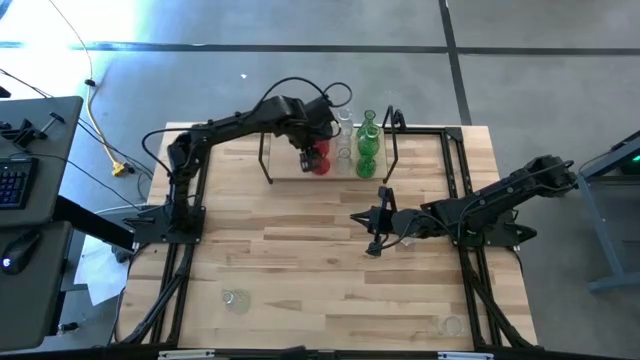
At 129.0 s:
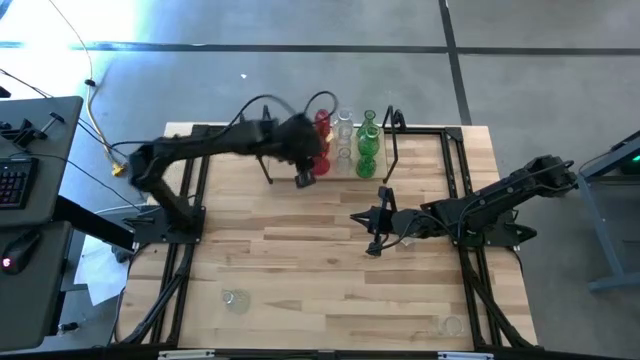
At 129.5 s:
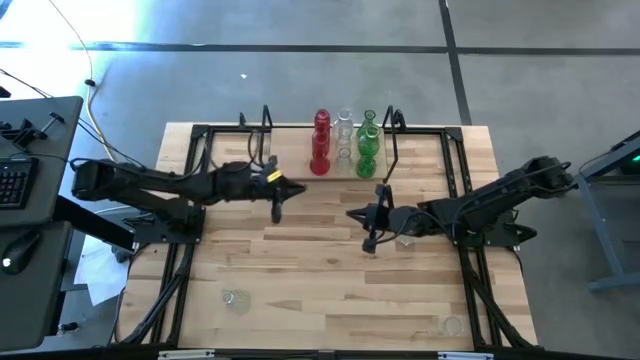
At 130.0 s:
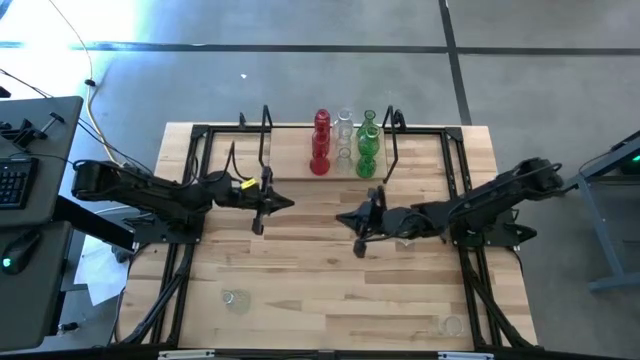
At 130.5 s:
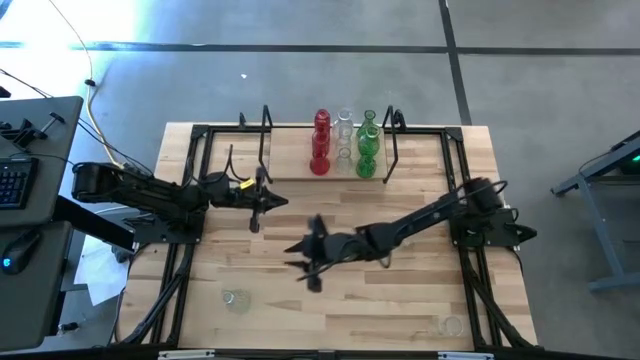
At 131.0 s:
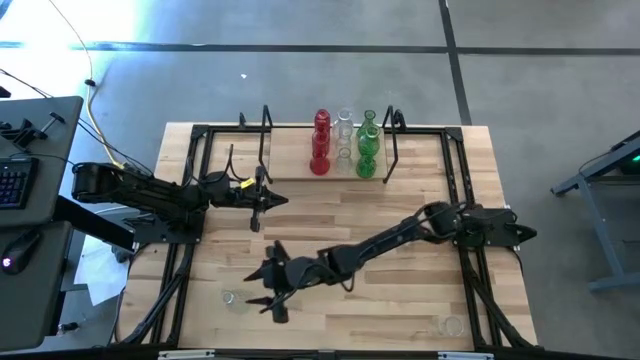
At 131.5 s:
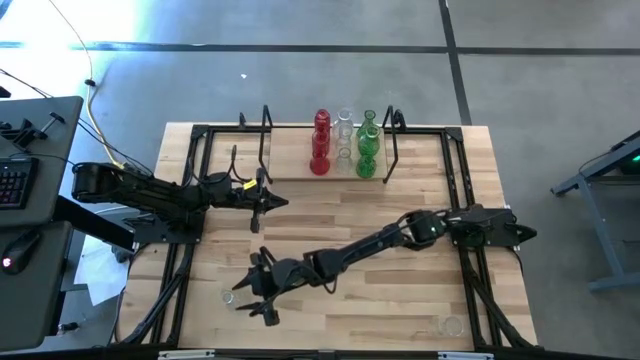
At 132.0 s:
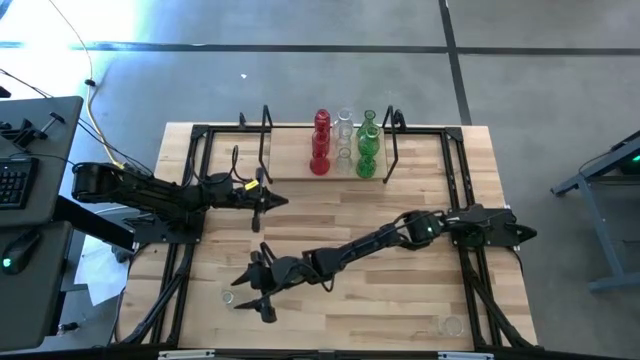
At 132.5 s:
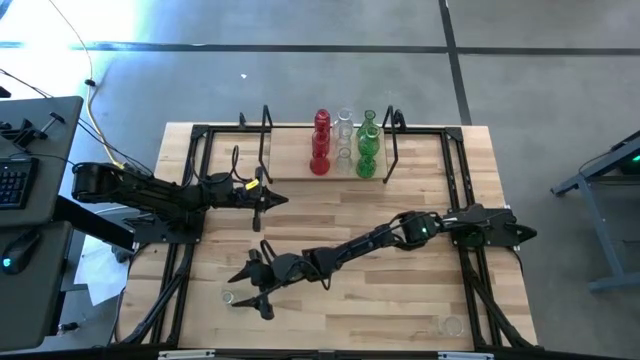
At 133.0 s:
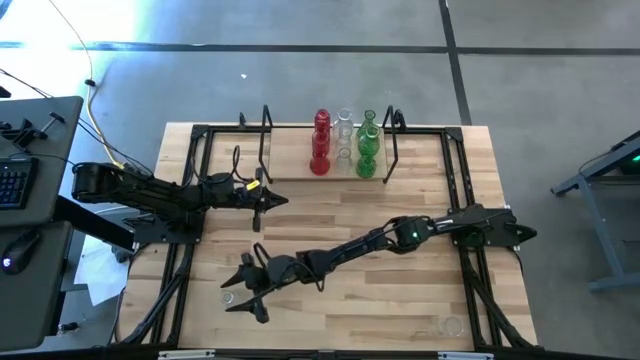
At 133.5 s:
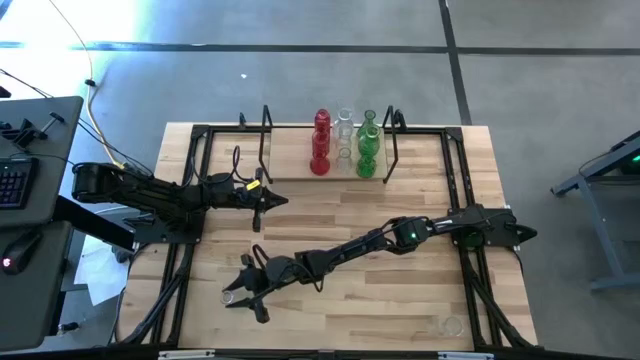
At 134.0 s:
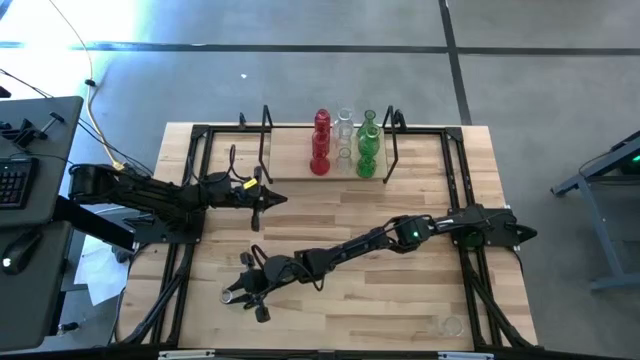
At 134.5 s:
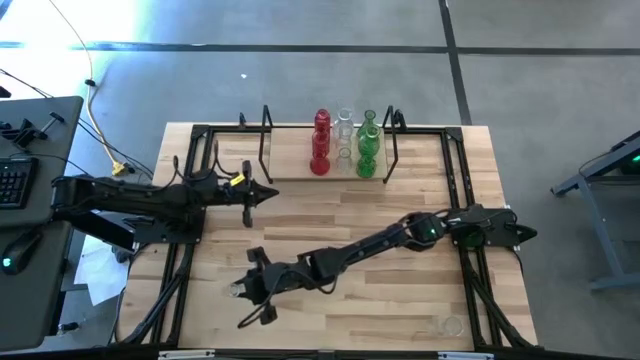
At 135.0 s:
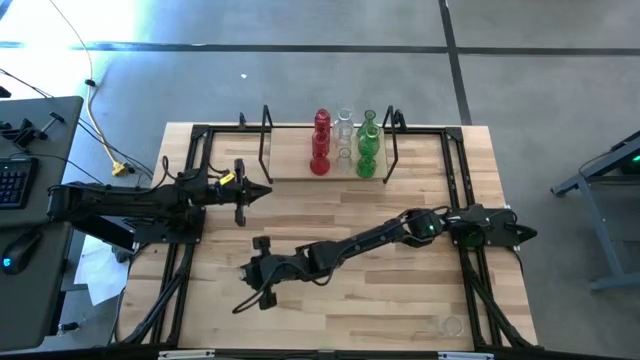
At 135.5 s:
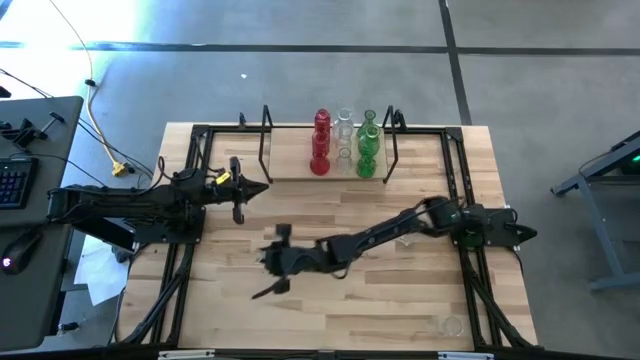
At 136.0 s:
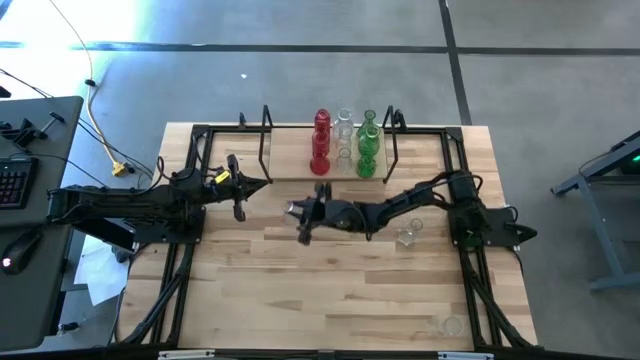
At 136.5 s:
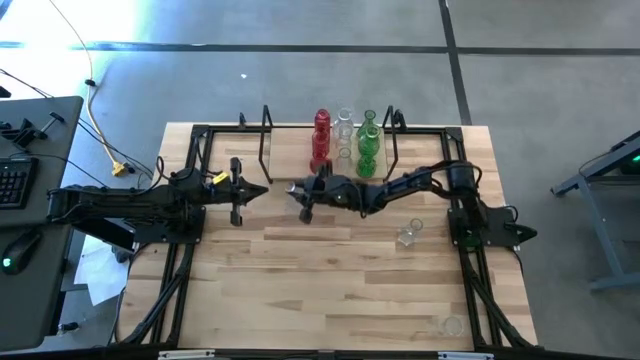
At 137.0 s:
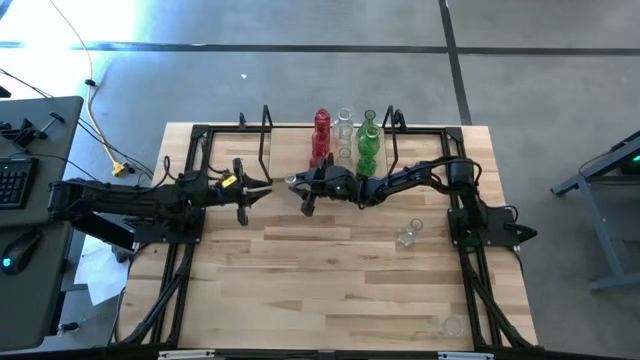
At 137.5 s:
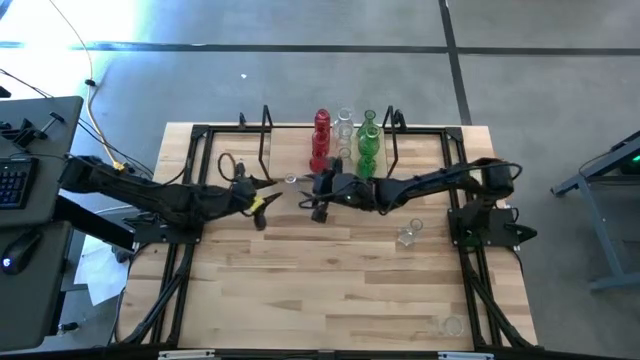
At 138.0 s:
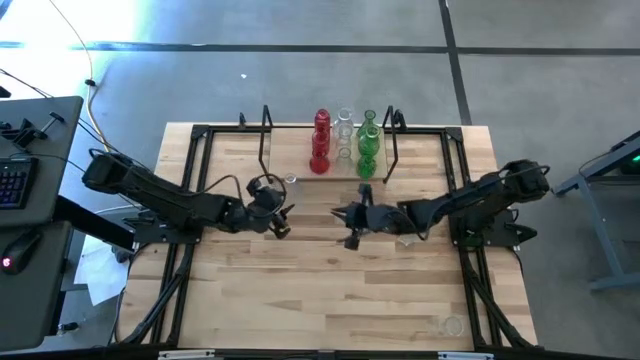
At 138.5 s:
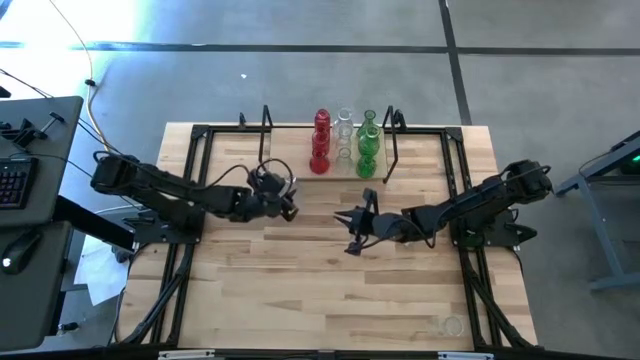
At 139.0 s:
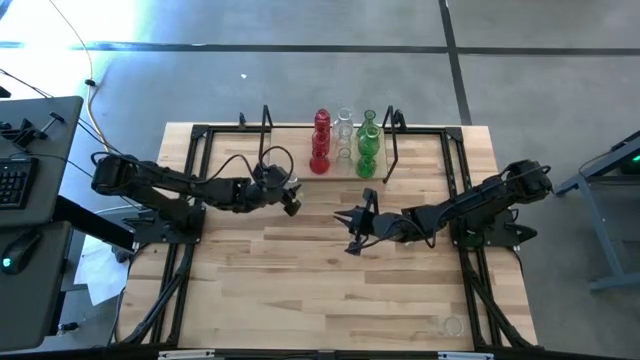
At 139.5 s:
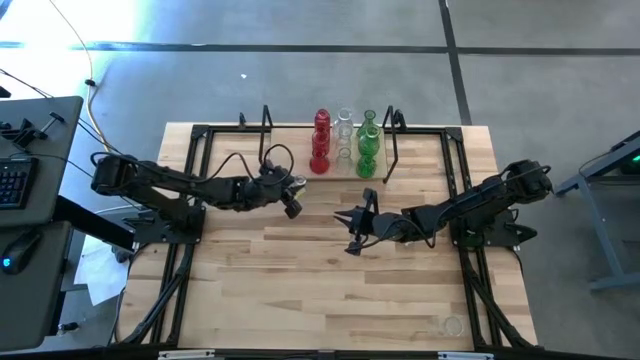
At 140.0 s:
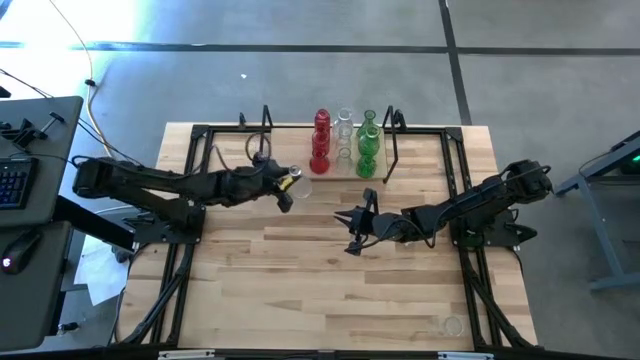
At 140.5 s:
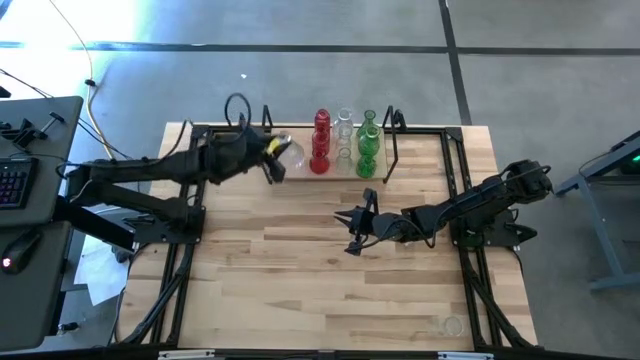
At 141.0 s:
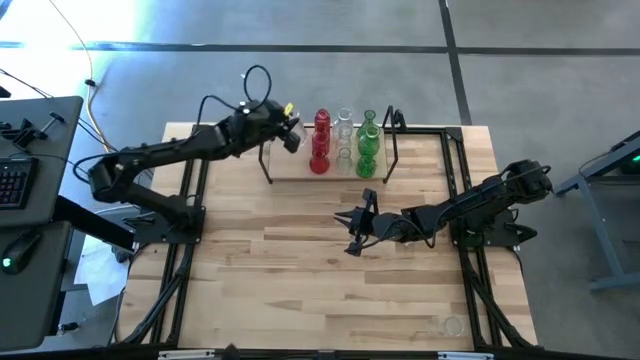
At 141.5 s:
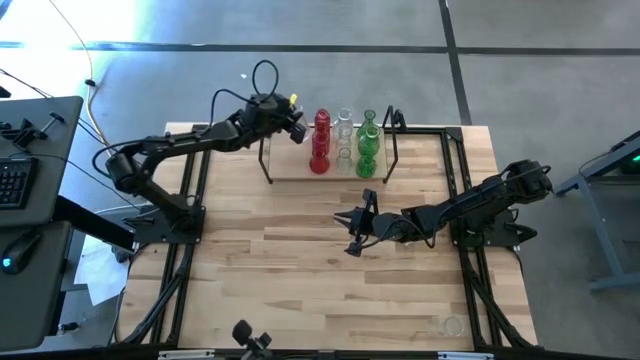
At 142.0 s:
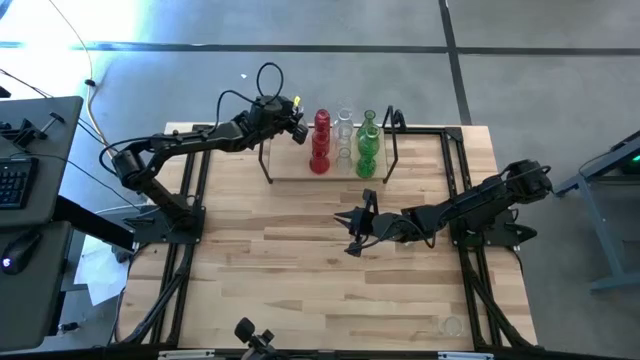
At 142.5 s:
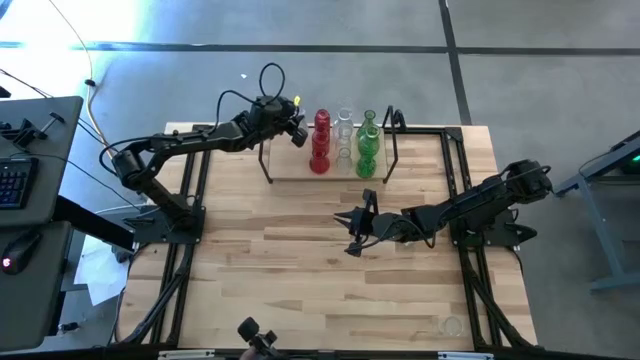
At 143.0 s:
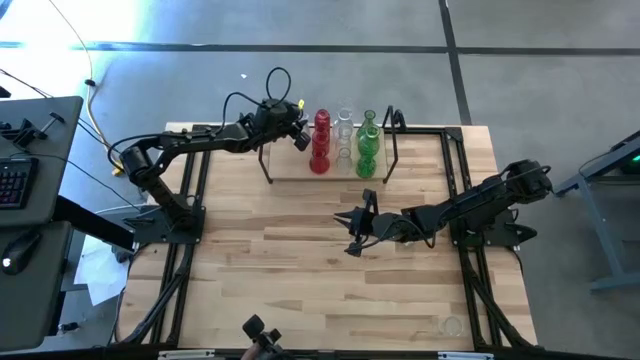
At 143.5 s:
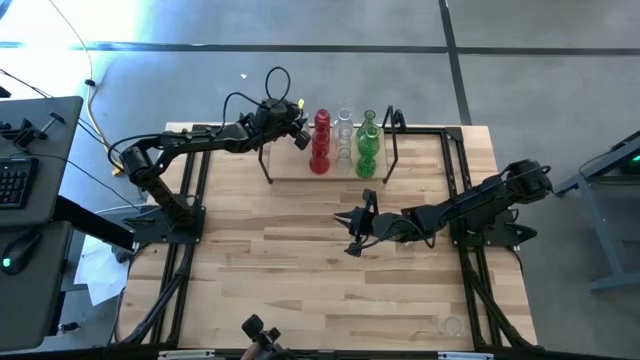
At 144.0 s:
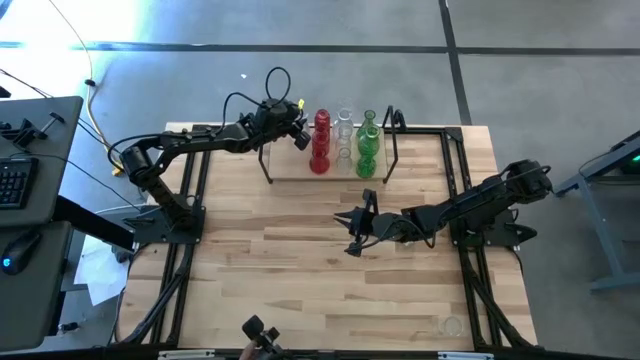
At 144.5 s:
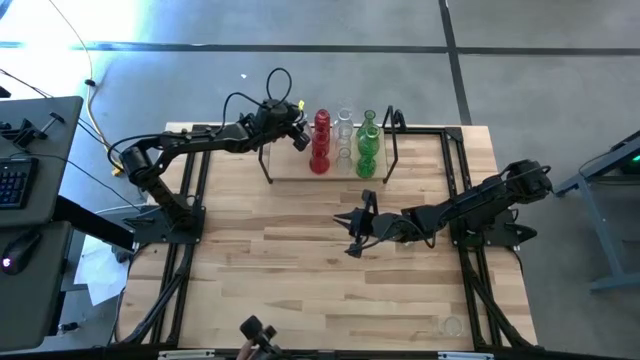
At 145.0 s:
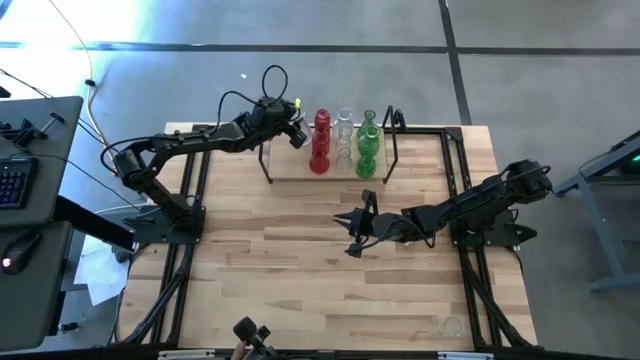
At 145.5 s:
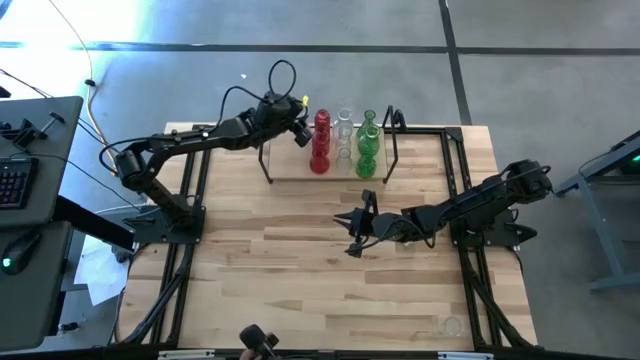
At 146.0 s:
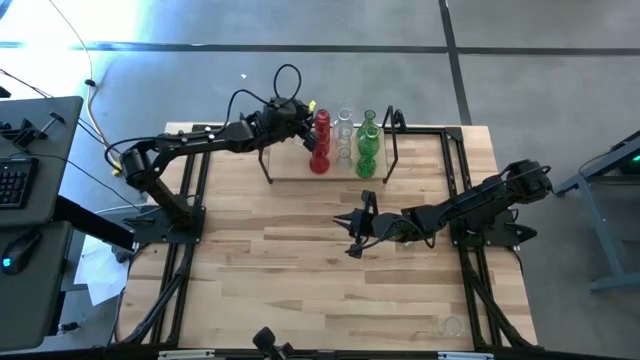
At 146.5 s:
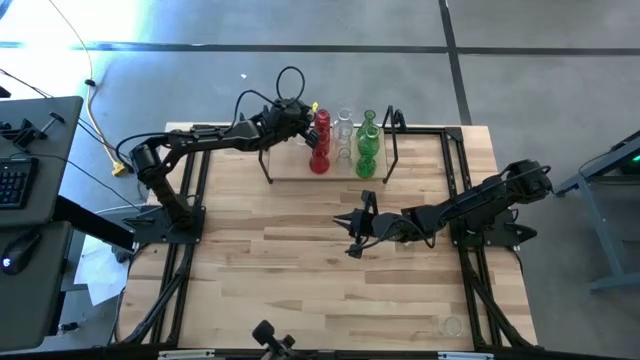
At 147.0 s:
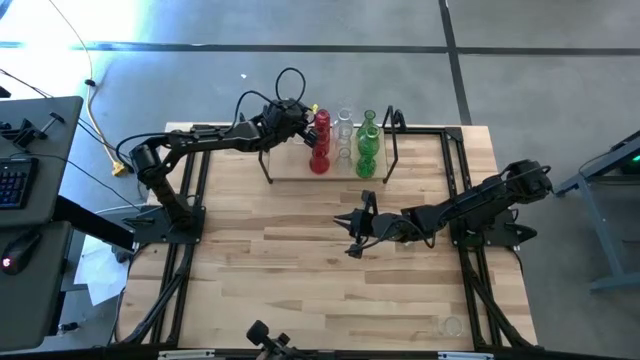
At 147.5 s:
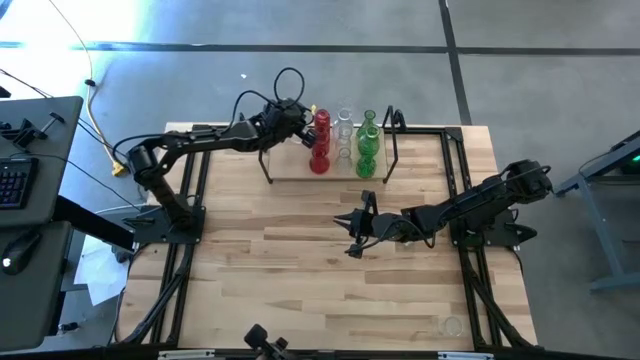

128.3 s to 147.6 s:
Task: sort vases onto shelf
Put the bottom left transparent vase on the shelf
